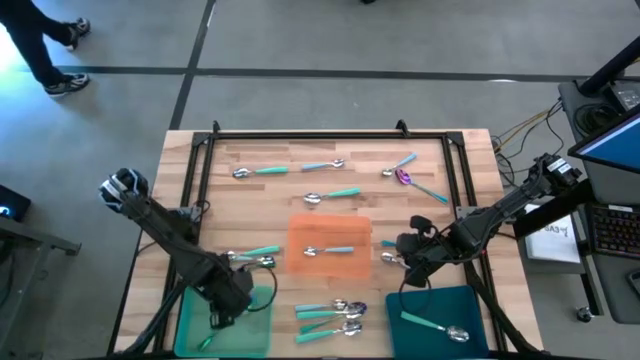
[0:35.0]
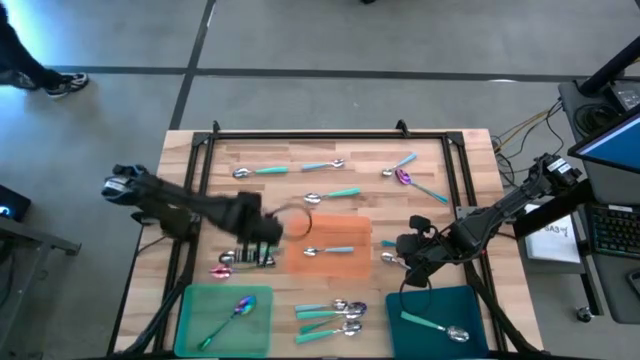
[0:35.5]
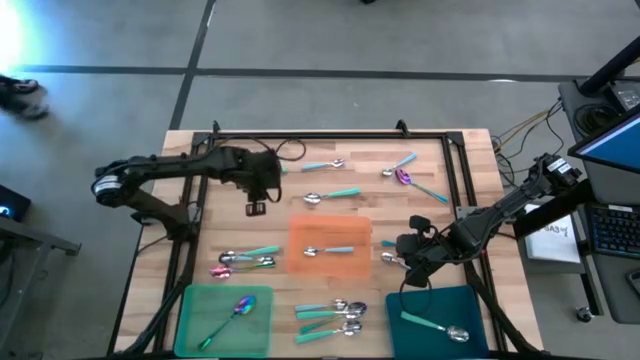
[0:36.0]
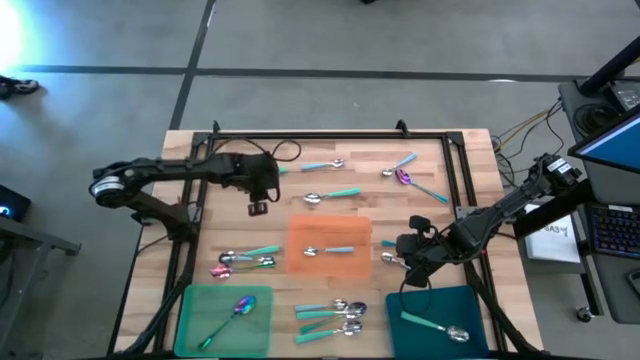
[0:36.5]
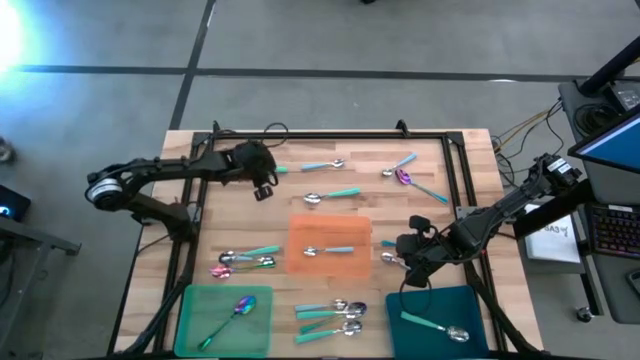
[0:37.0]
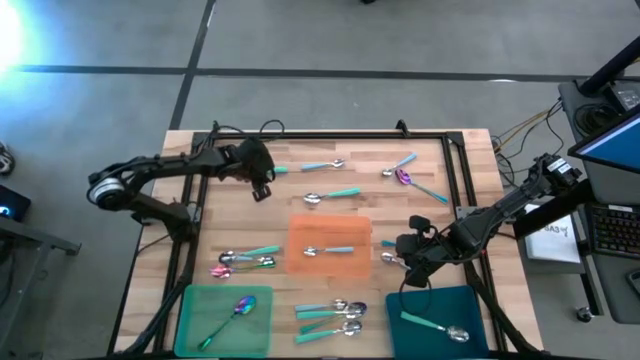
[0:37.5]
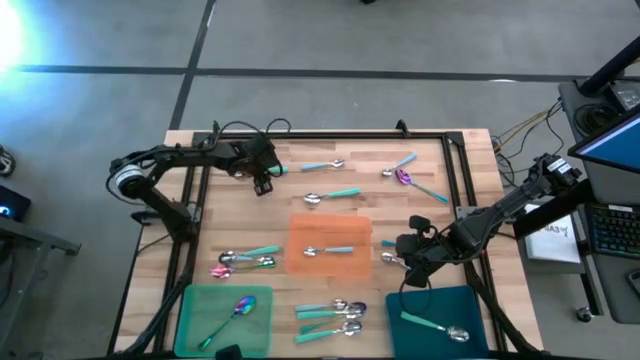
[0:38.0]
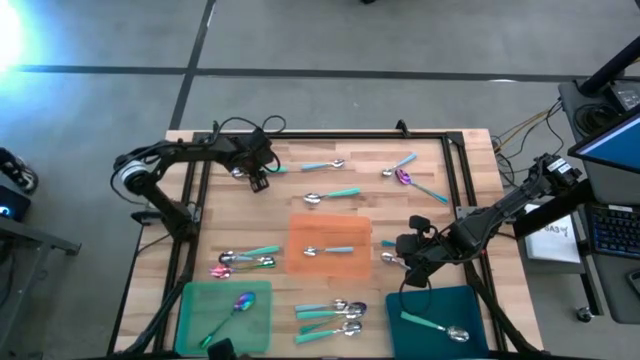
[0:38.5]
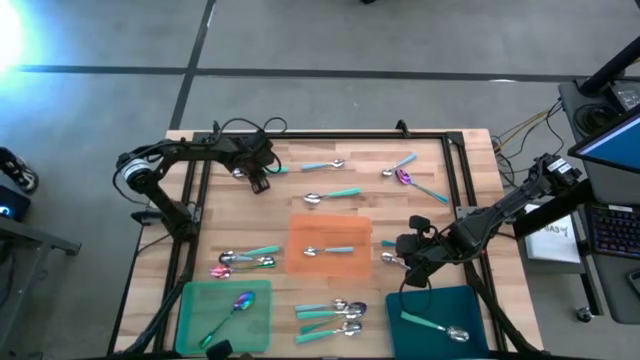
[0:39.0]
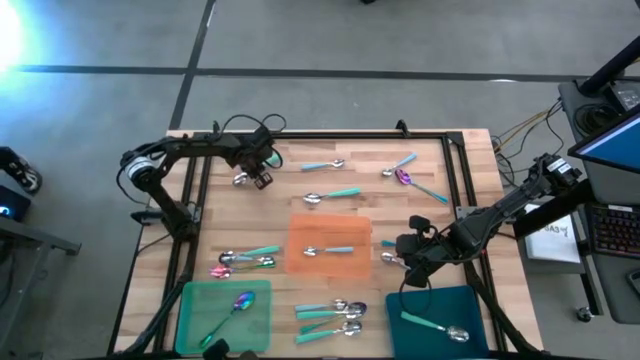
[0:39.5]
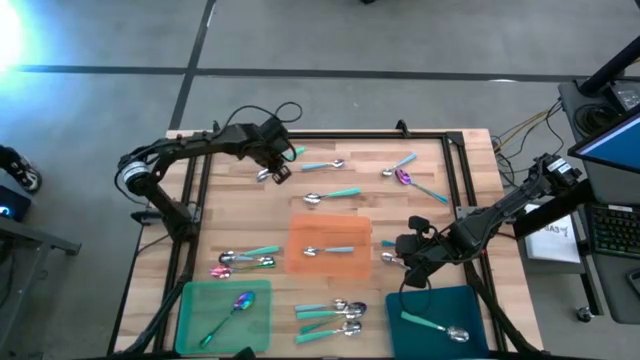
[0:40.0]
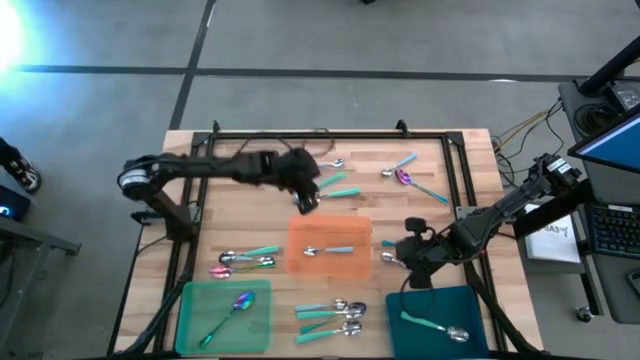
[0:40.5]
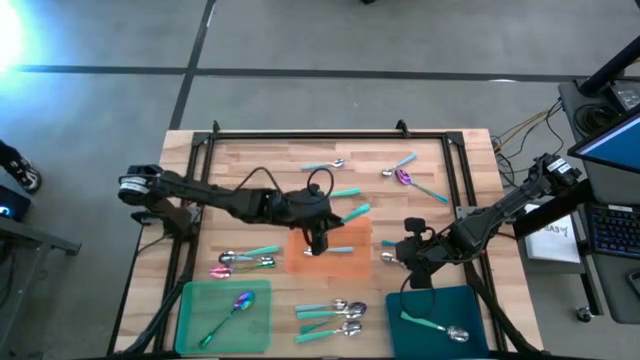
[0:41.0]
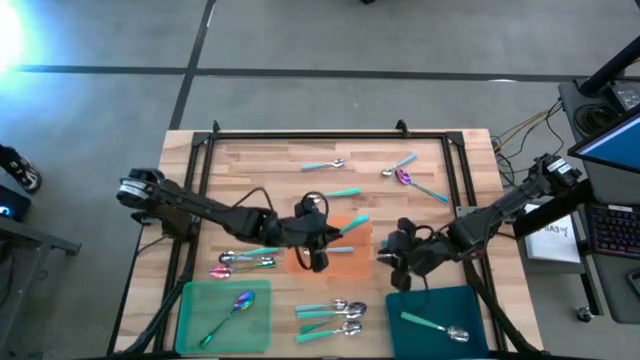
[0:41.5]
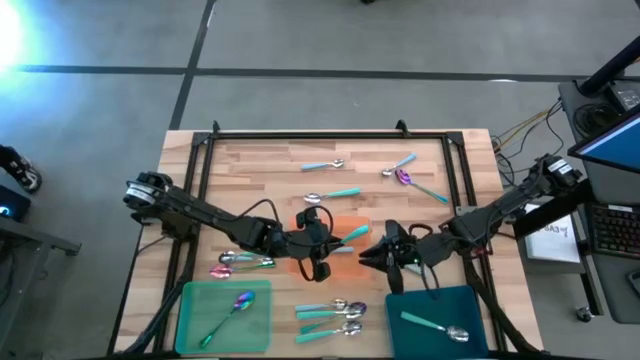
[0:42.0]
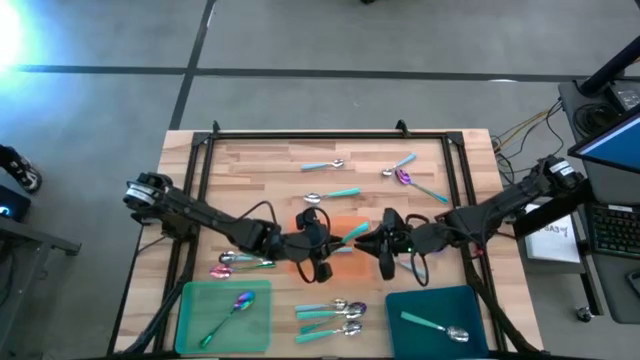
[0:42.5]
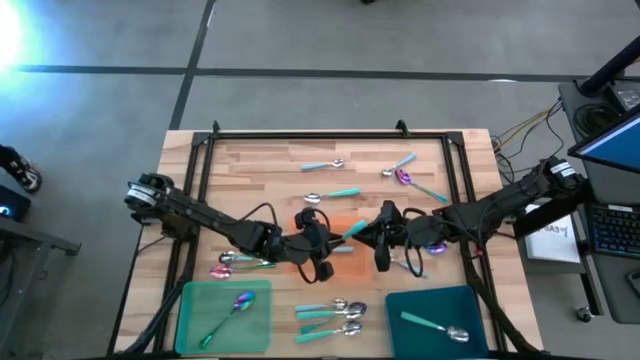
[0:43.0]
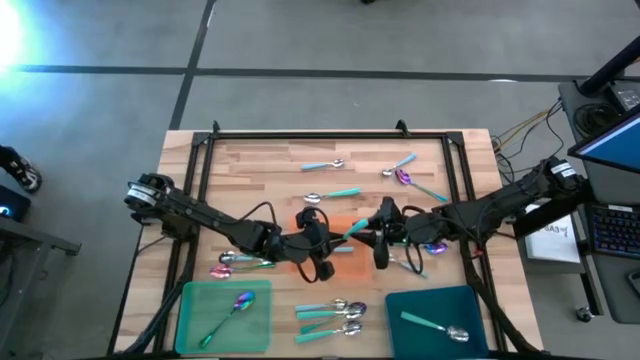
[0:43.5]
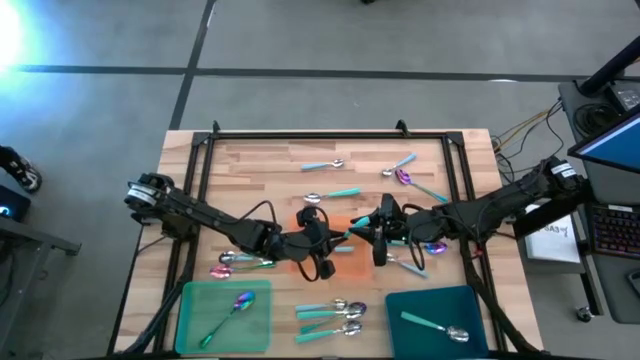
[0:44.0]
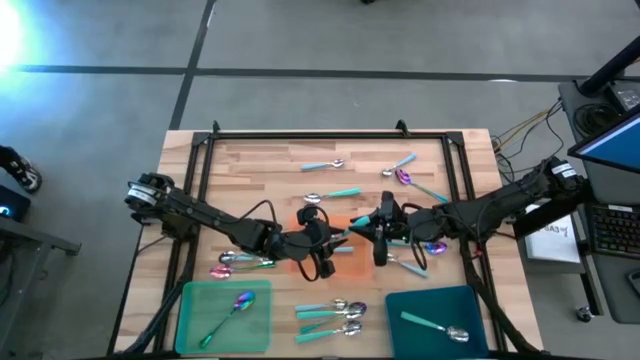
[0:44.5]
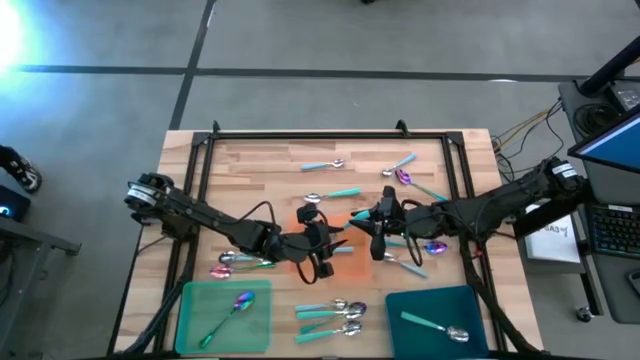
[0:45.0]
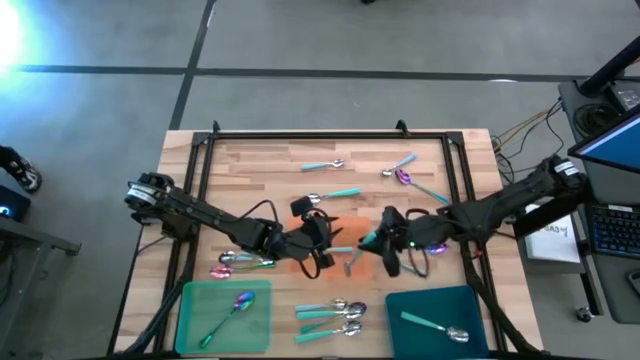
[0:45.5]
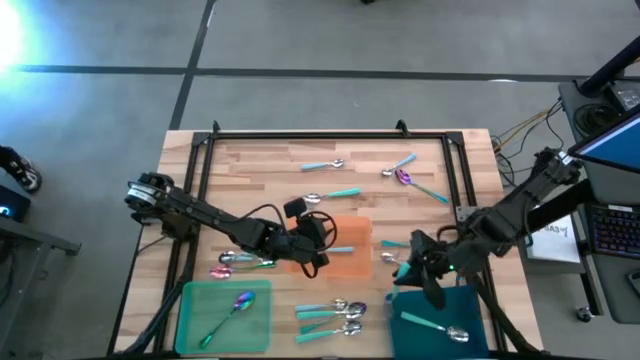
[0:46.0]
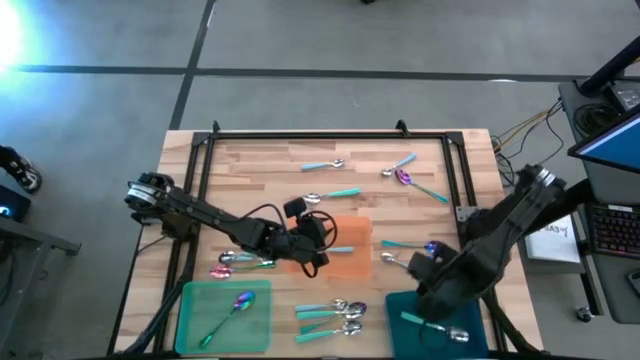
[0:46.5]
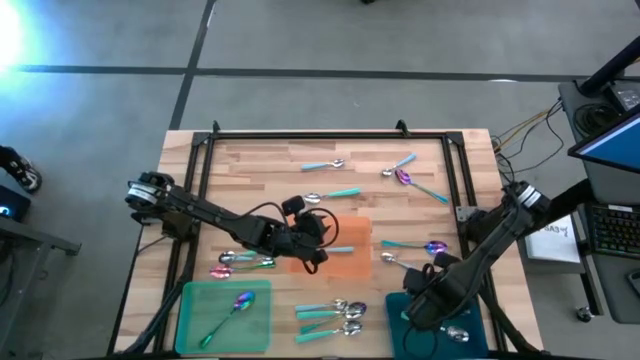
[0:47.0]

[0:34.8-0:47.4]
Task: Sort silverware by color (type)
Put the green spoon into the blue bin

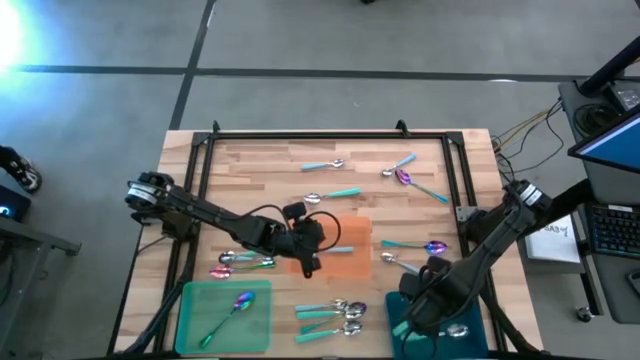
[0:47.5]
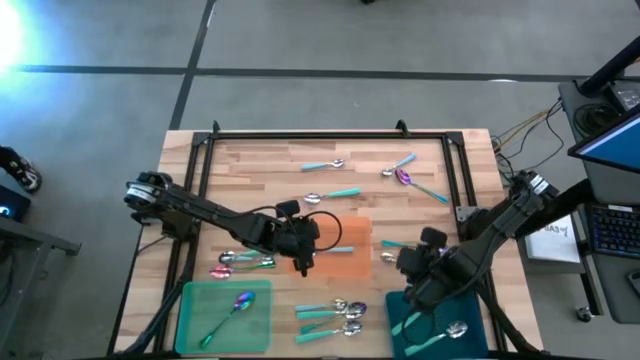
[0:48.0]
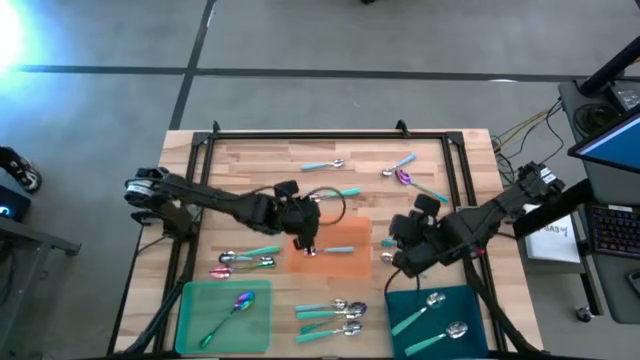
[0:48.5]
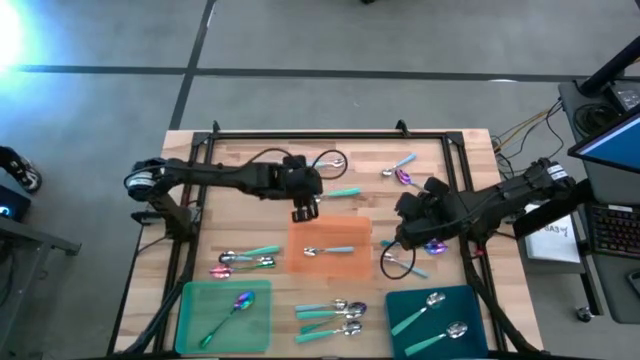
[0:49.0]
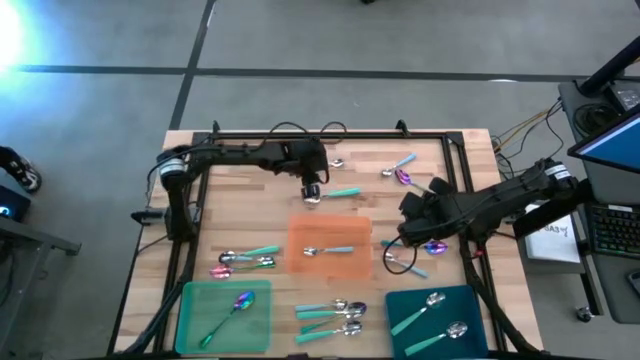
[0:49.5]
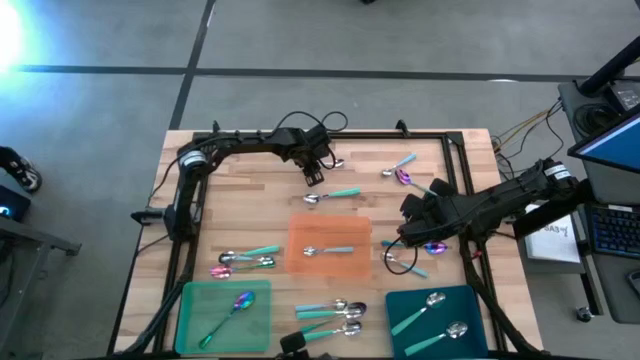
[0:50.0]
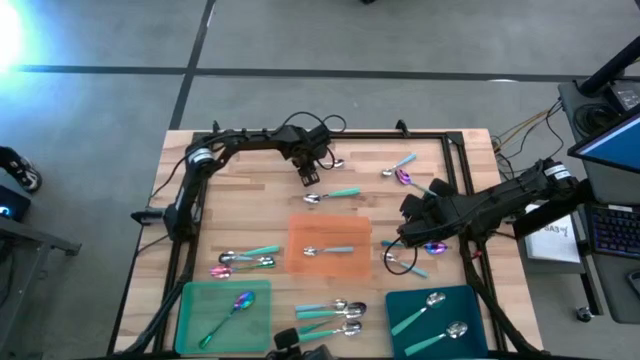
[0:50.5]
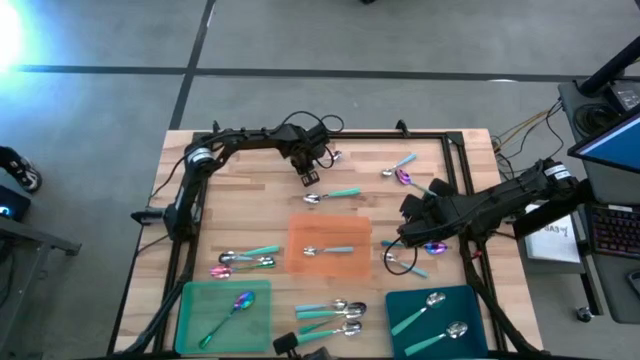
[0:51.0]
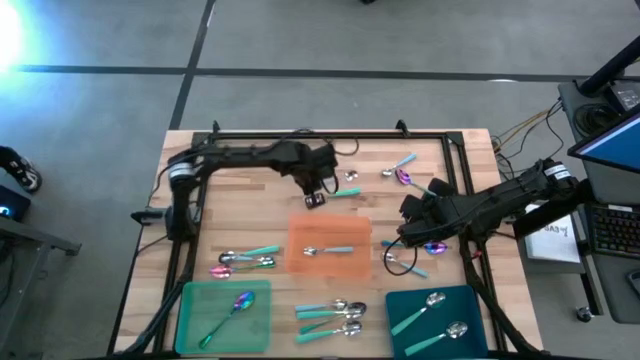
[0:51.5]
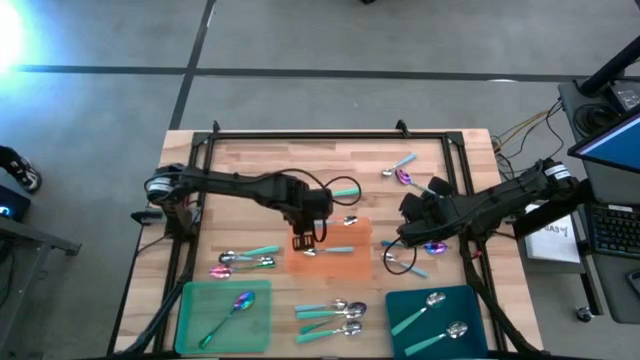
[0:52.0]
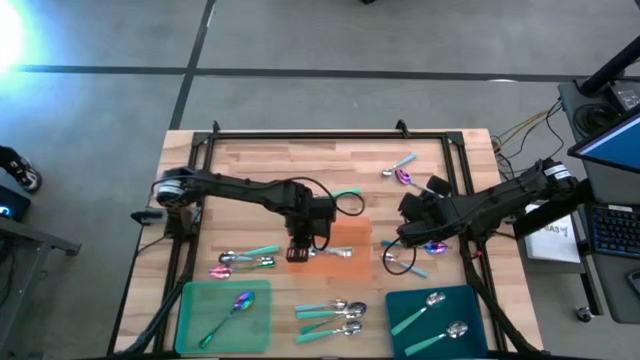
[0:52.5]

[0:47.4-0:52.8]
Put the blue spoon into the orange bin

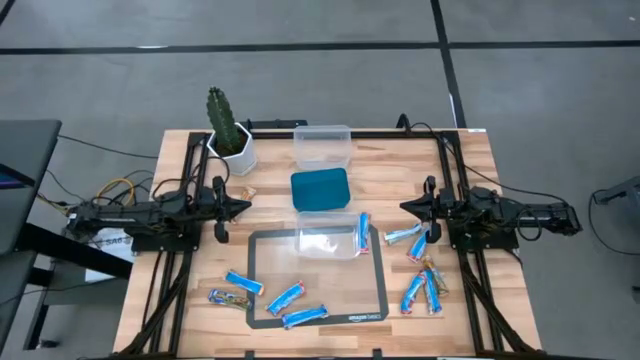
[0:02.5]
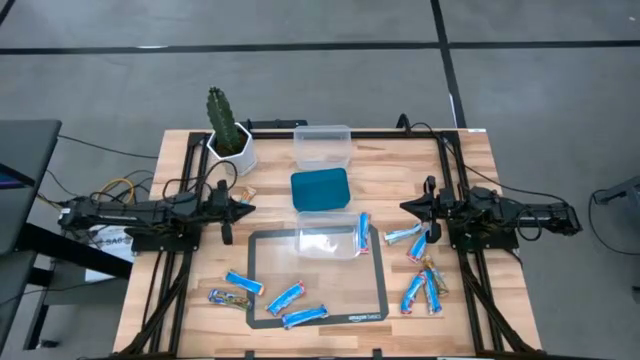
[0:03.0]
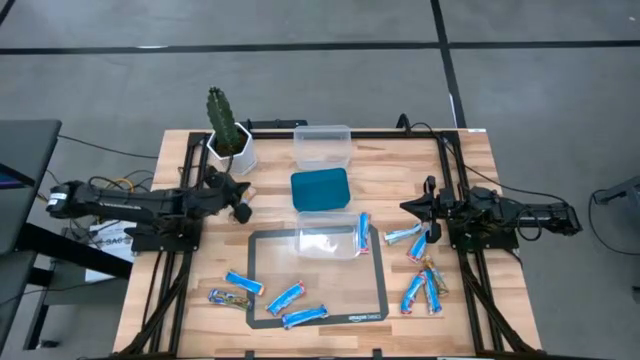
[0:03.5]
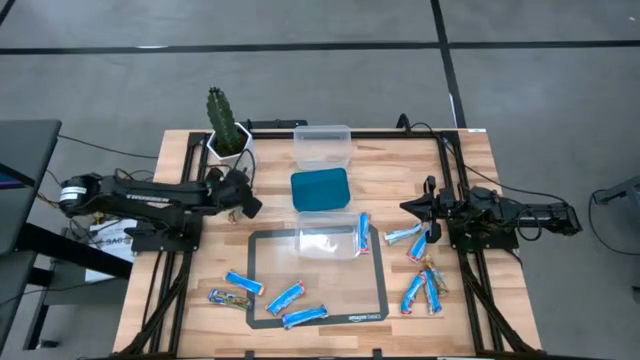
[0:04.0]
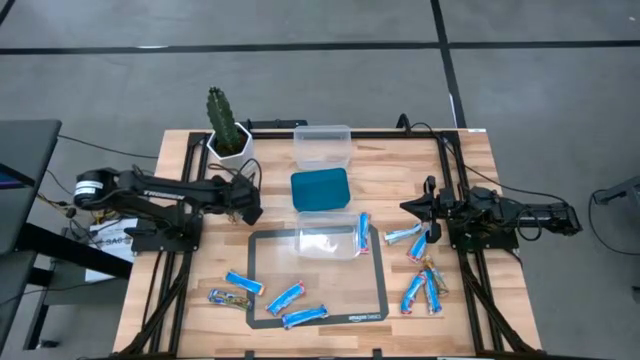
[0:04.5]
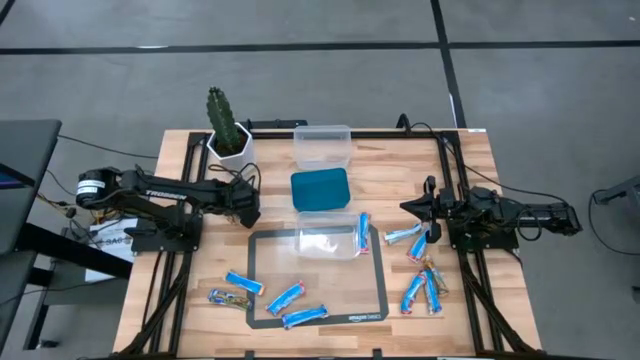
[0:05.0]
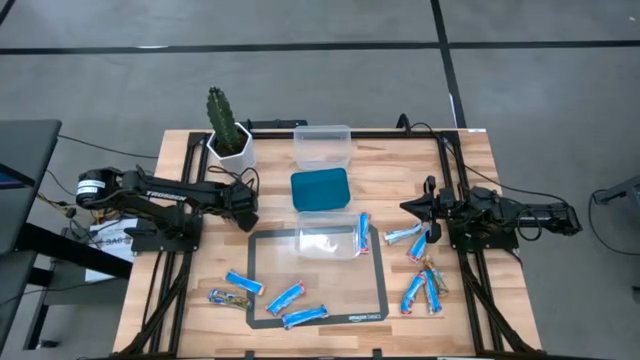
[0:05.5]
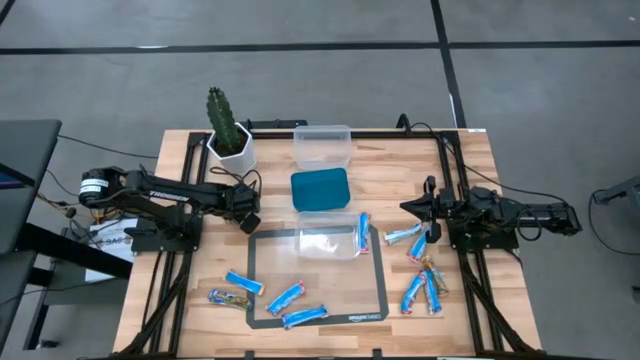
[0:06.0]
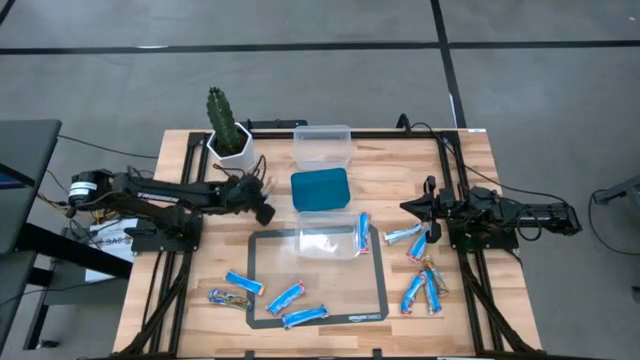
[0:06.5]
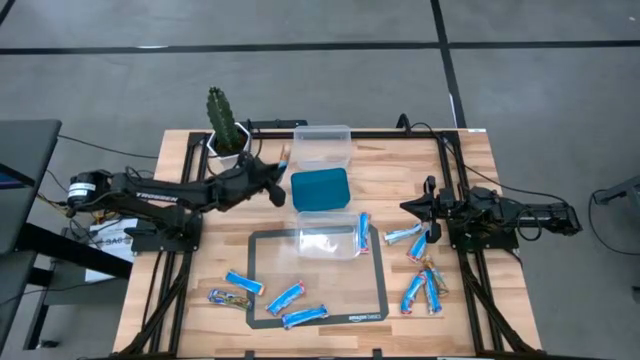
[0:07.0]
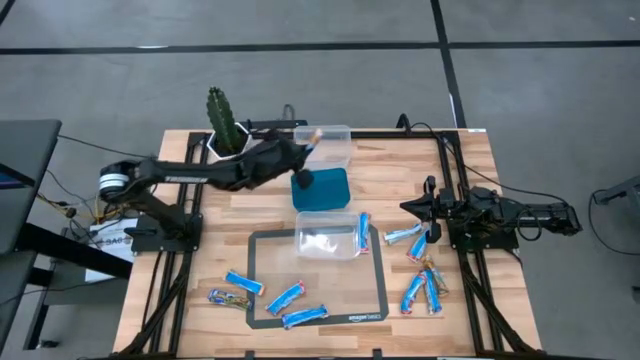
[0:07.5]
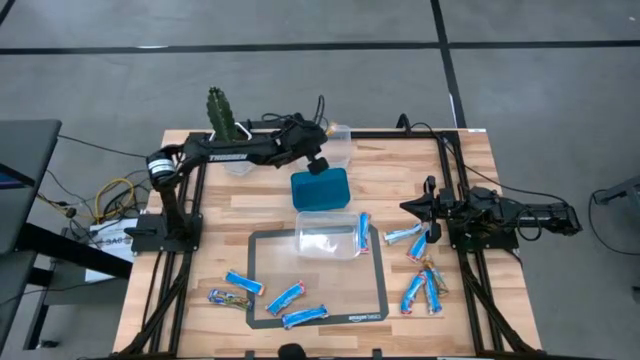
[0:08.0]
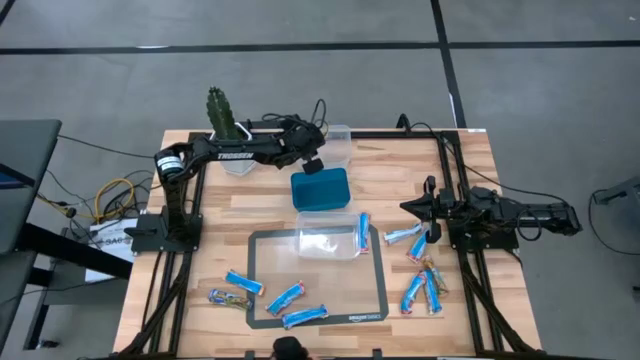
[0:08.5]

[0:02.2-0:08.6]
Task: Pick and place Granola Bars by type
Put the orange granola bar into the top transparent bin
